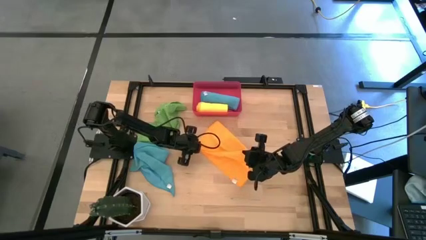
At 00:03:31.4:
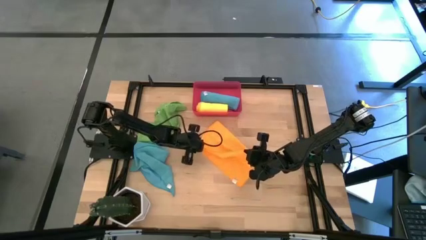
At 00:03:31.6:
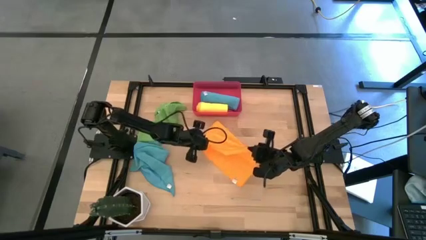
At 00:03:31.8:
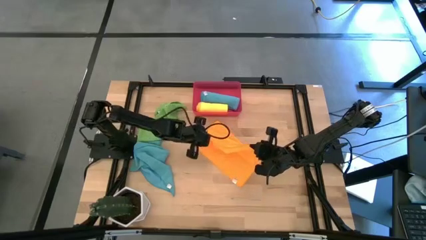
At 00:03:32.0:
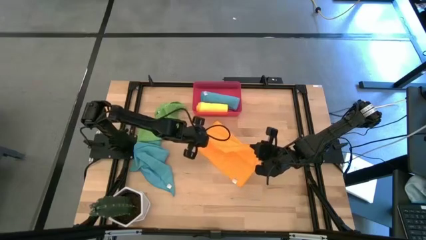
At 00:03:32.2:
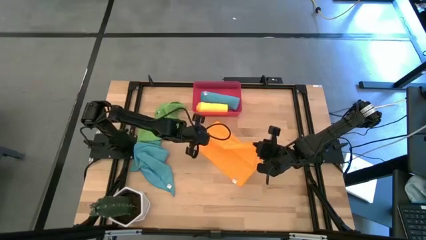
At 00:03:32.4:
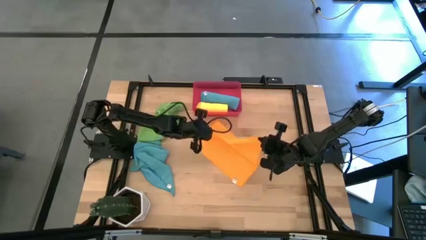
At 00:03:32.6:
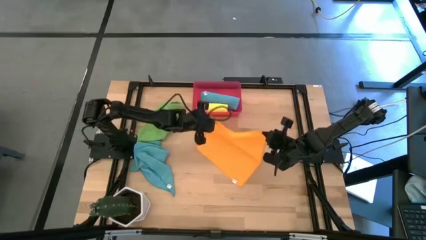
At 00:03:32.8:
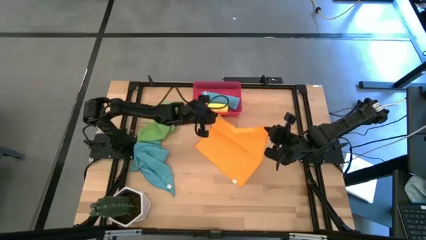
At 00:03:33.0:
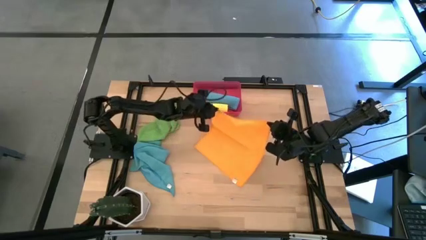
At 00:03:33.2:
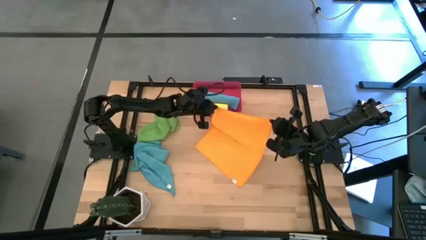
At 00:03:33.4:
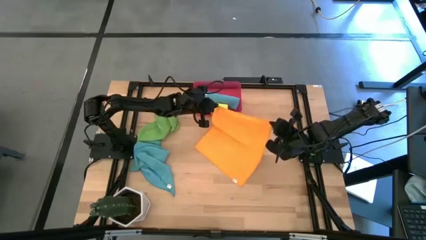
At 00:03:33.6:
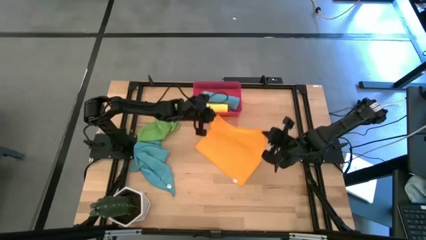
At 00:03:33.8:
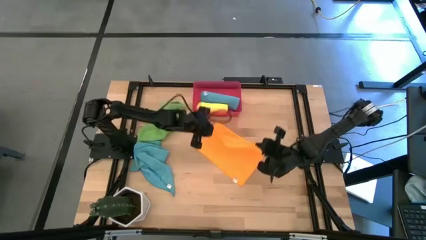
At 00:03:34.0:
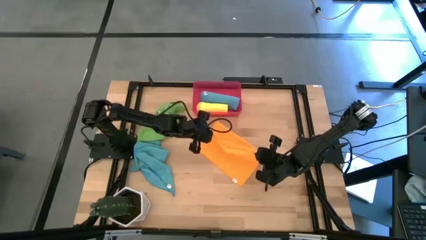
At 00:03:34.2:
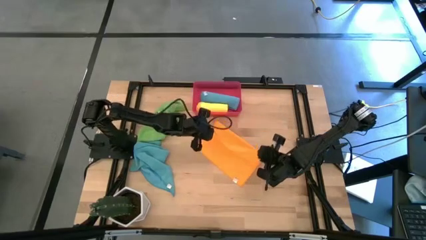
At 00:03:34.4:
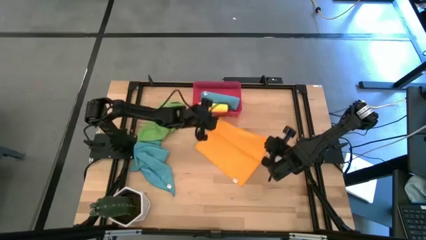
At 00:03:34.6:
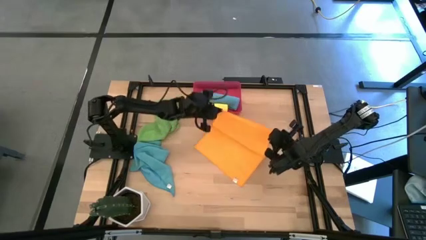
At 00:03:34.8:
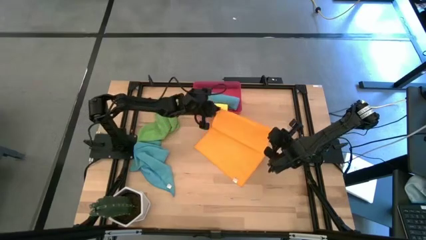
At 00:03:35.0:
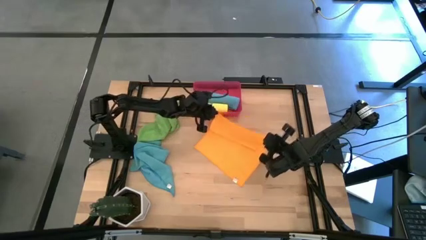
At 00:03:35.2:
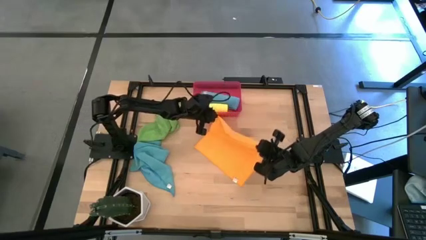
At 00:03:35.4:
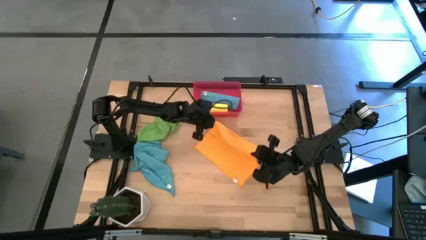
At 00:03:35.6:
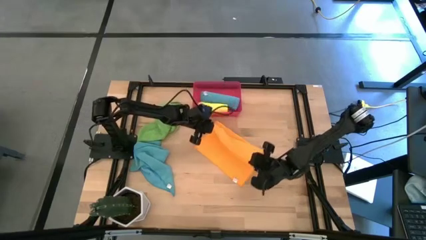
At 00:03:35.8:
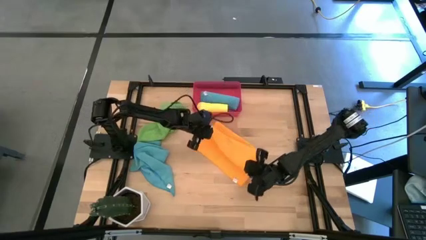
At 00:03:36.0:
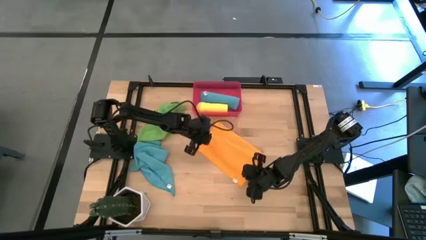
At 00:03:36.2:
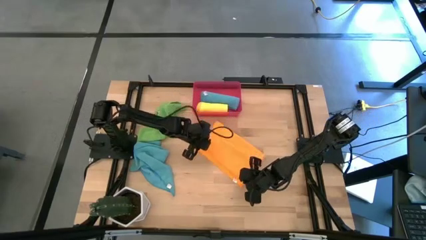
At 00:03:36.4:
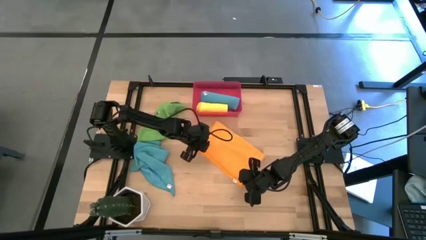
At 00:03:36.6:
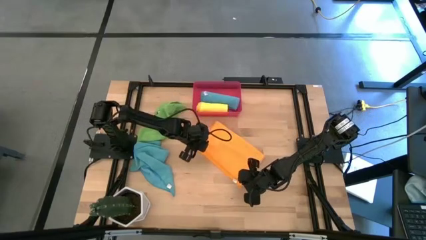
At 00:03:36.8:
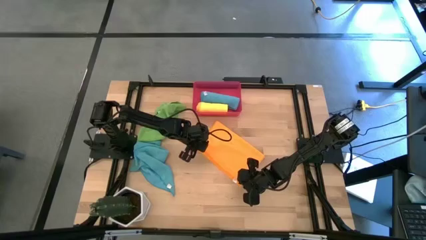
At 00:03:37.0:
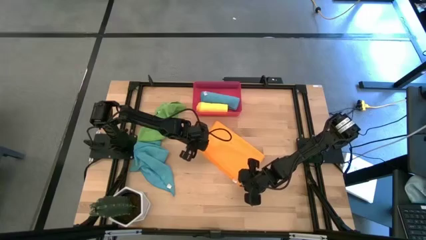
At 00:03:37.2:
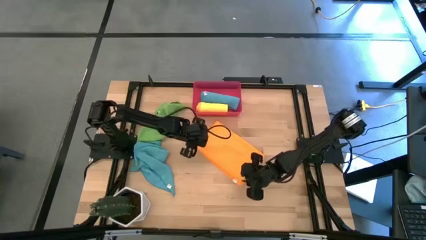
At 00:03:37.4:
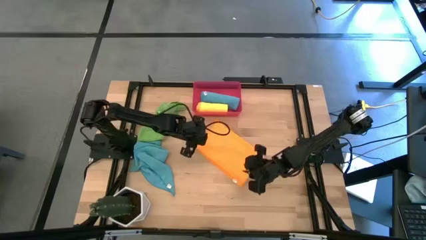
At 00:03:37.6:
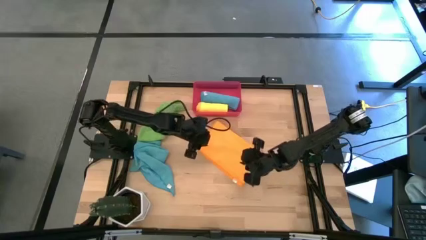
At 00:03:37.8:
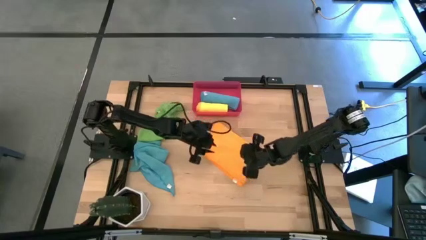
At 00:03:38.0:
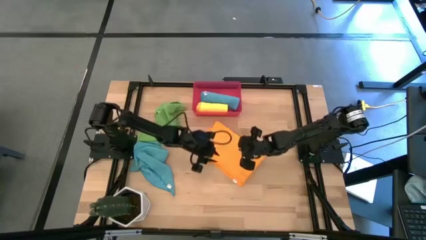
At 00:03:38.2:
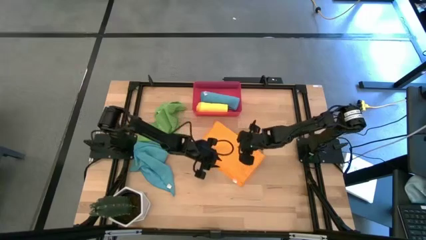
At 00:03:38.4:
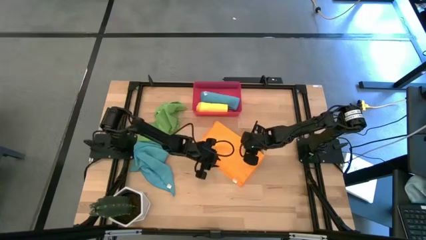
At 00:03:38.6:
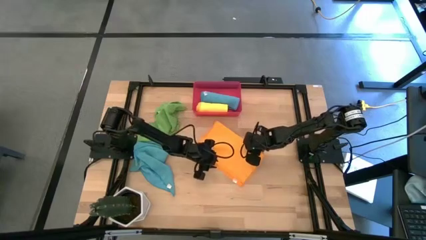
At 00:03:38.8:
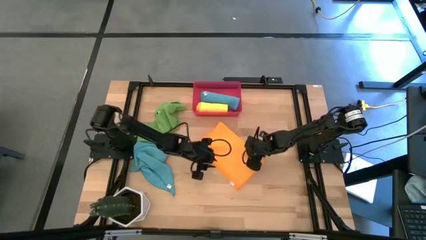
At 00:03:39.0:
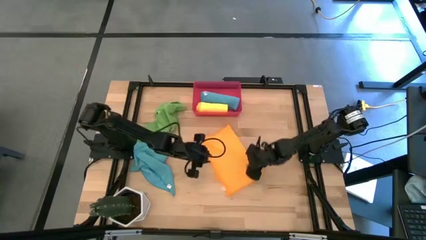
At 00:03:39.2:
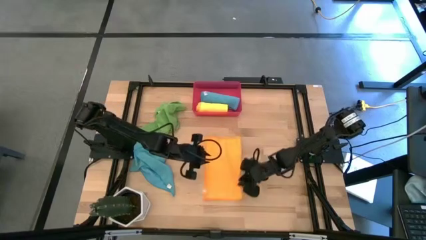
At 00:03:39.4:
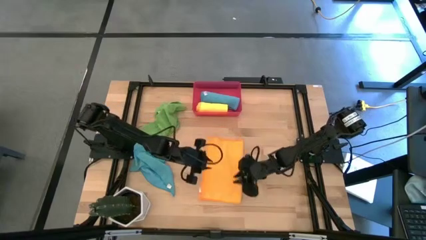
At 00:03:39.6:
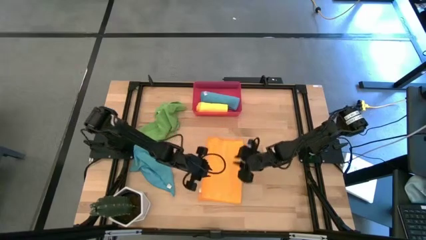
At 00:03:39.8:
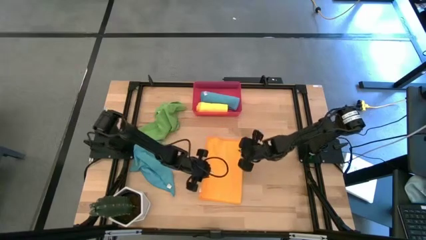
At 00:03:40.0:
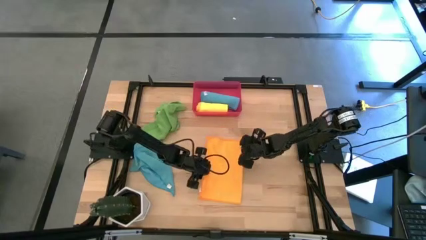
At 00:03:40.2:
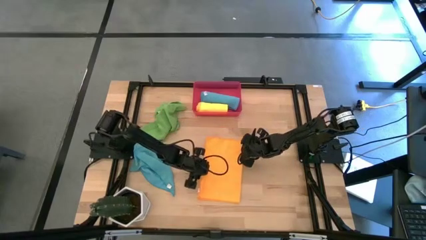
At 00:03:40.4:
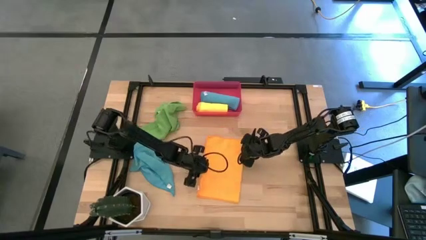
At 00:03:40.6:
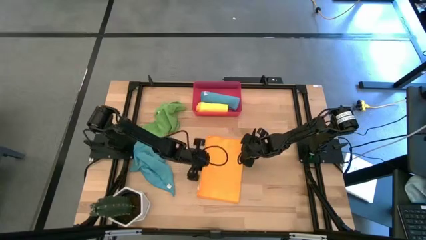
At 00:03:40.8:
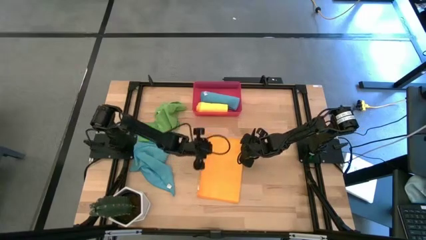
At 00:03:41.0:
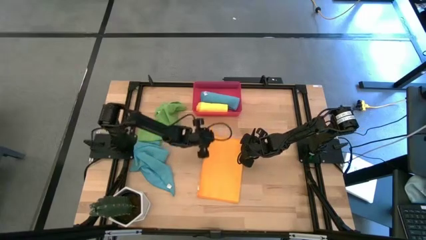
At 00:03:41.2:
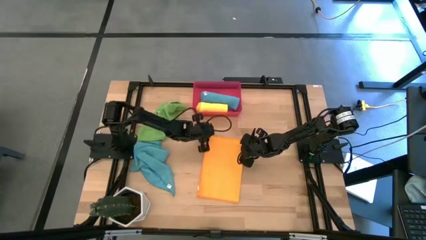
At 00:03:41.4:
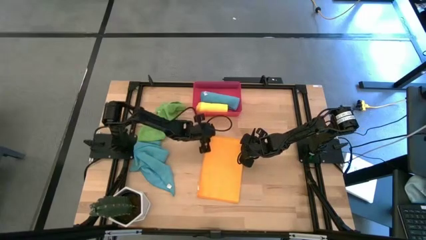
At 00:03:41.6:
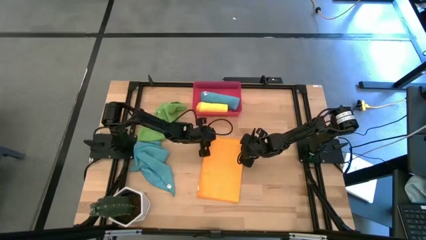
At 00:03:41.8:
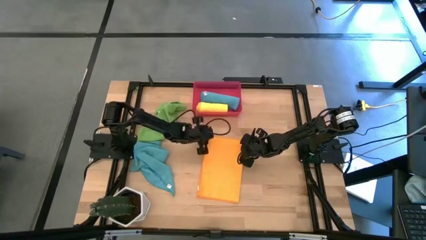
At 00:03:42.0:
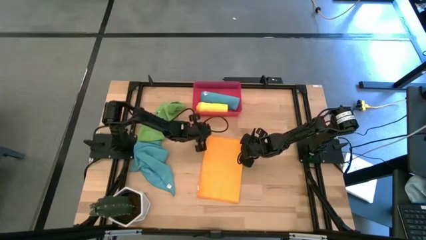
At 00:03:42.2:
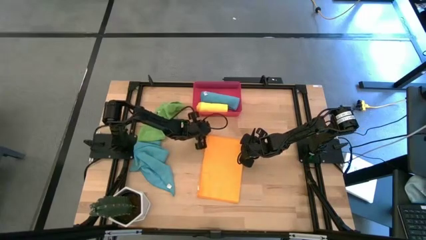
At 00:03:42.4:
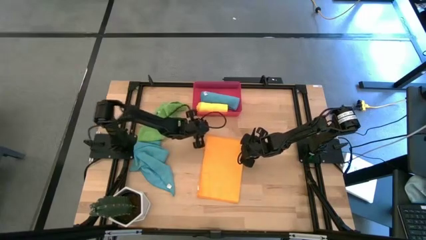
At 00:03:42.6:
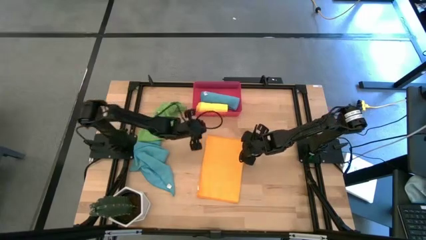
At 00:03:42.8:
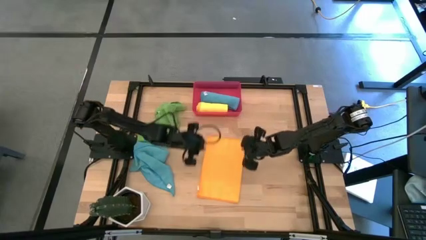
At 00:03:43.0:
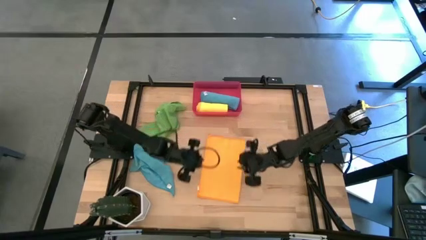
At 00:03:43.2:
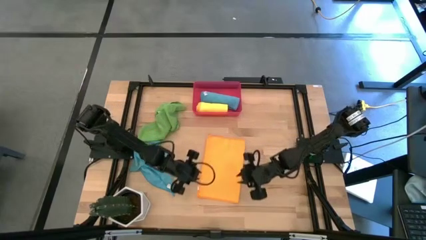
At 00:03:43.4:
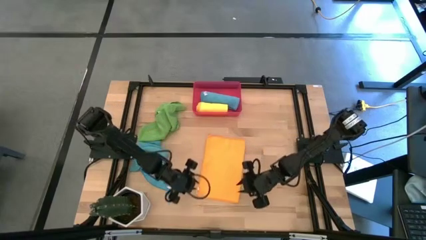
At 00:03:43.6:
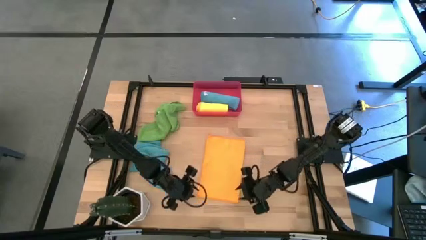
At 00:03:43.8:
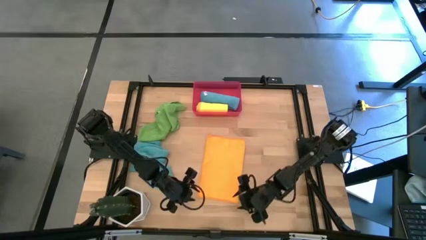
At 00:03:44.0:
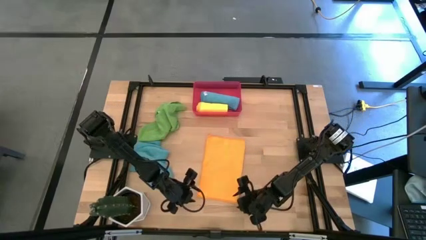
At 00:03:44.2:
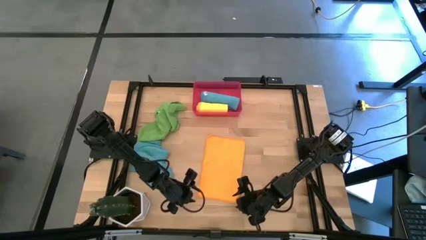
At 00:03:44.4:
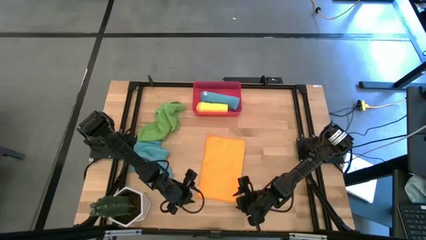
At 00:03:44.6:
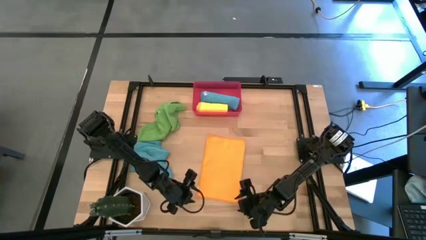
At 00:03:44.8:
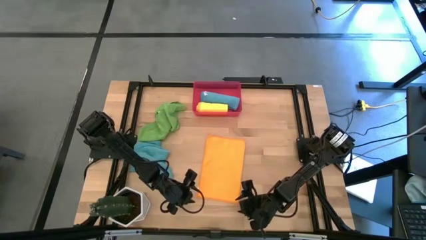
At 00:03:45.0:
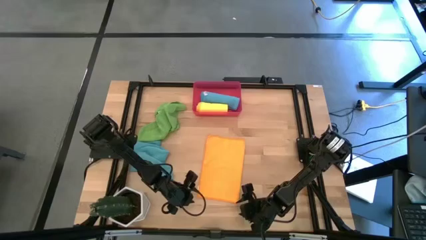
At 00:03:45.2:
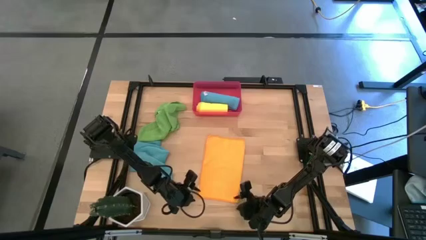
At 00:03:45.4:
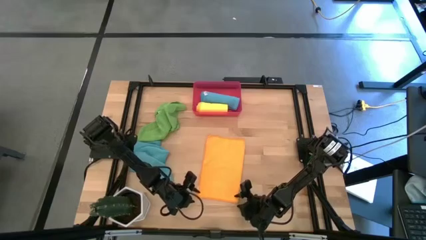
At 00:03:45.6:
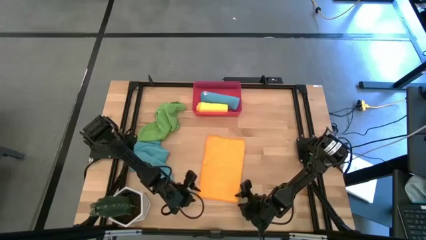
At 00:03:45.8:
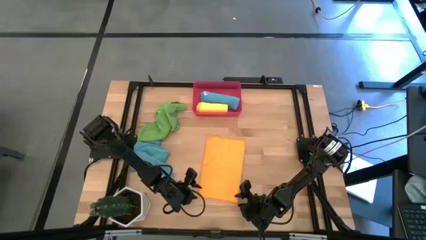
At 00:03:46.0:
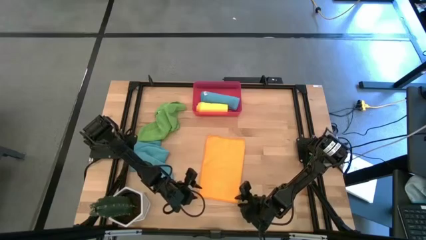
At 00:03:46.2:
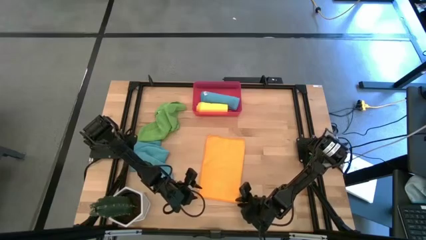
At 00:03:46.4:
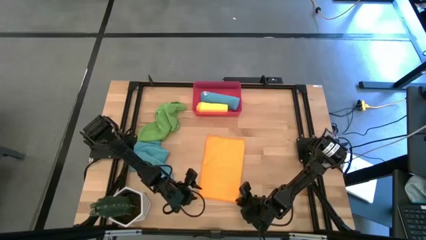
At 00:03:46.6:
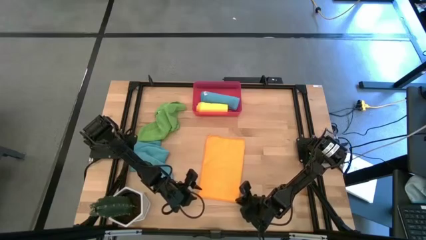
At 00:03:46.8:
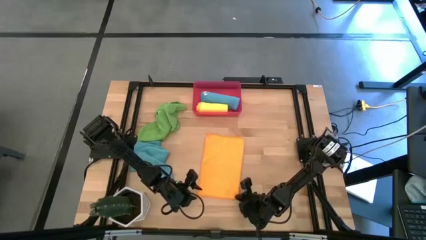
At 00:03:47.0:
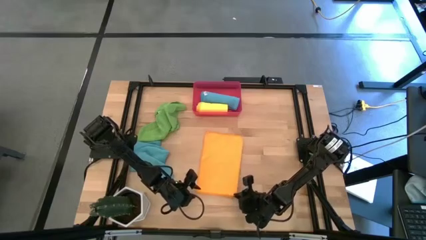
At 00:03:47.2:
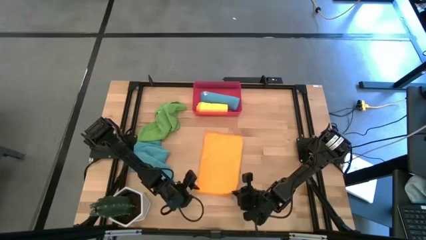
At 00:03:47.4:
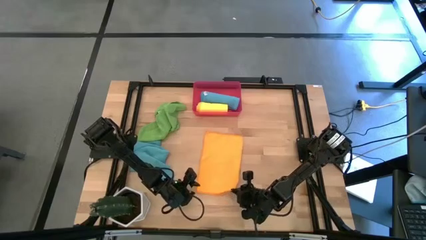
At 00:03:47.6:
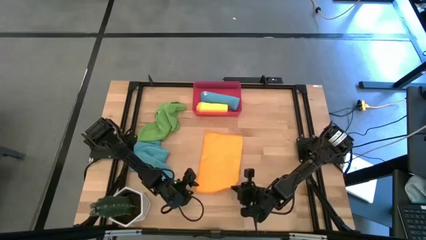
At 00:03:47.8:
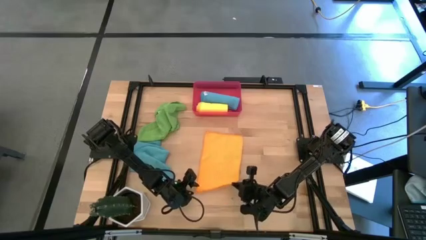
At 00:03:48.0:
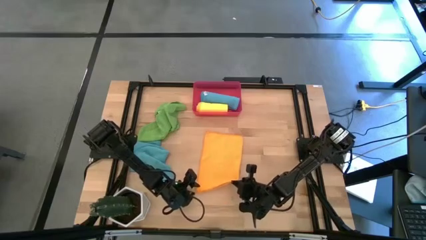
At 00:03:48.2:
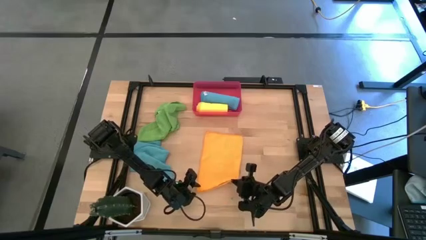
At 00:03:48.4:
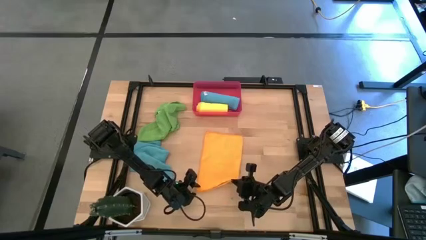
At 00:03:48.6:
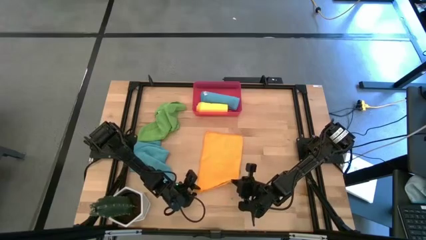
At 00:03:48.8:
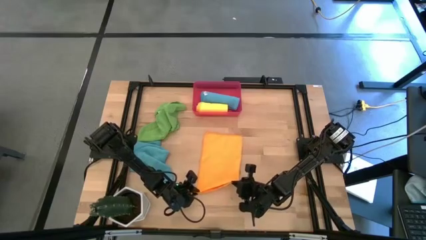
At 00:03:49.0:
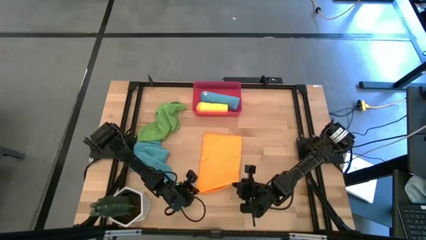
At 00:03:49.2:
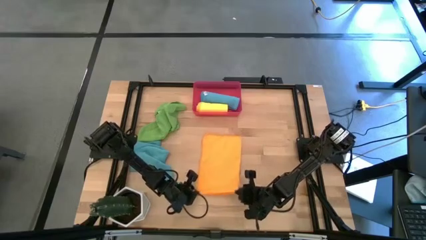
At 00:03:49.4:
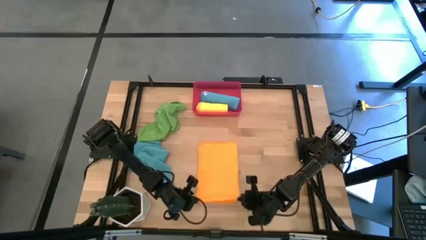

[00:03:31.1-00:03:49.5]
Task: Roll microfiber towels into tight, uniform cylinder then place into a basket
Roll the orange microfiber cloth
